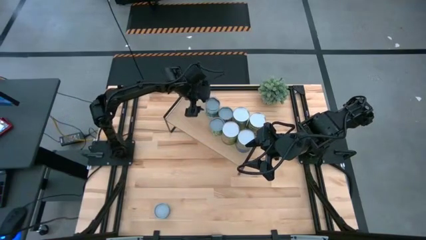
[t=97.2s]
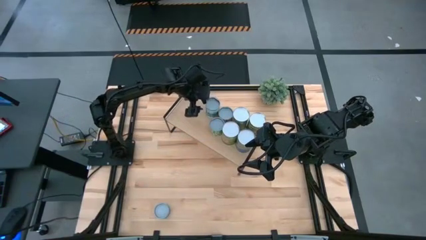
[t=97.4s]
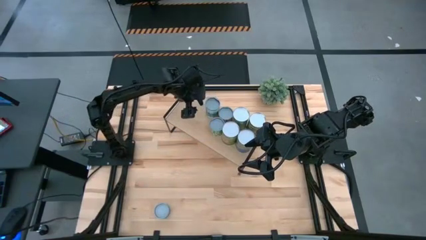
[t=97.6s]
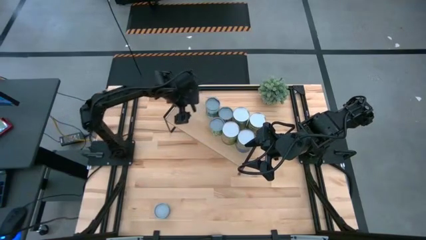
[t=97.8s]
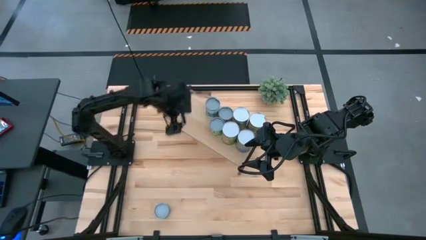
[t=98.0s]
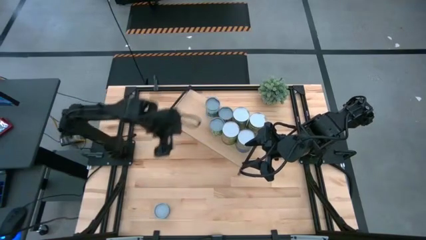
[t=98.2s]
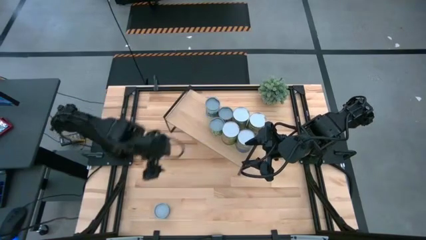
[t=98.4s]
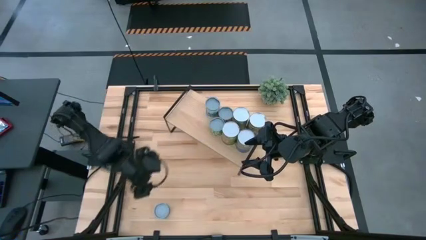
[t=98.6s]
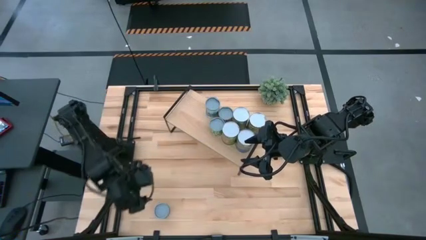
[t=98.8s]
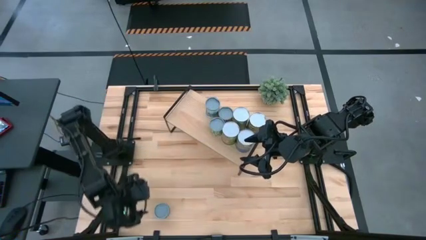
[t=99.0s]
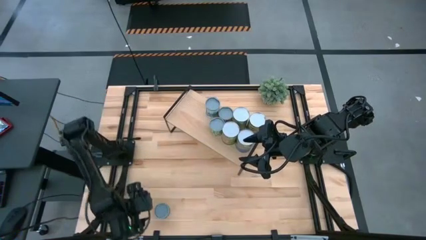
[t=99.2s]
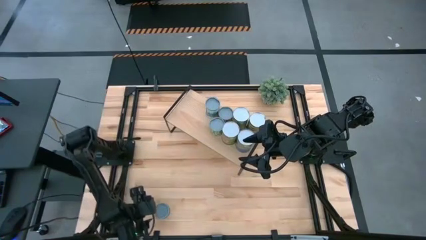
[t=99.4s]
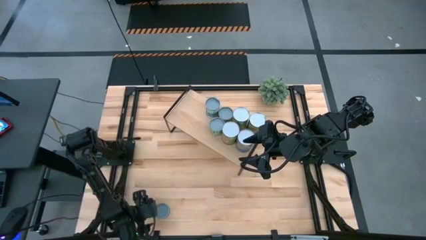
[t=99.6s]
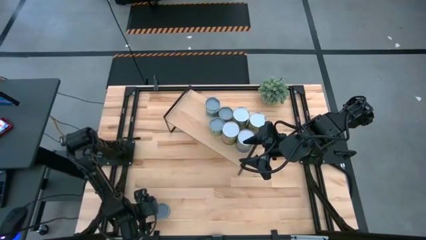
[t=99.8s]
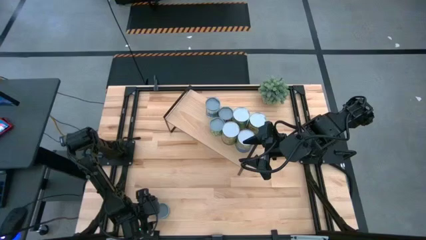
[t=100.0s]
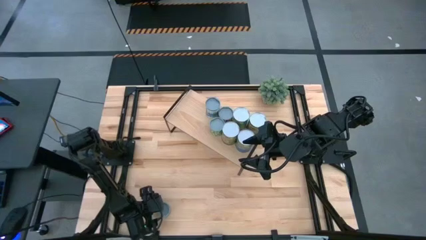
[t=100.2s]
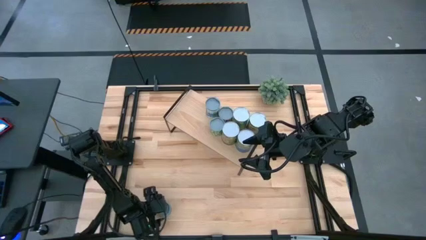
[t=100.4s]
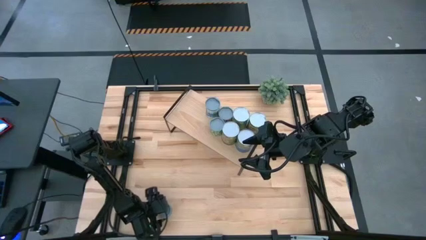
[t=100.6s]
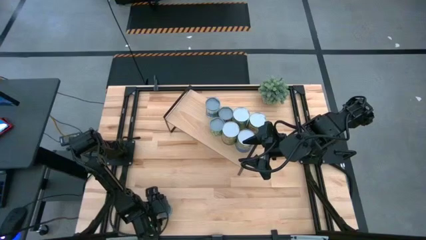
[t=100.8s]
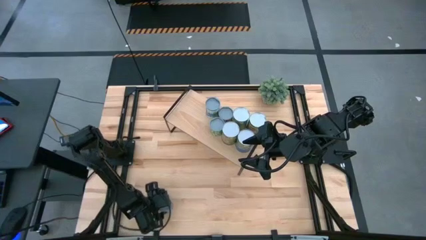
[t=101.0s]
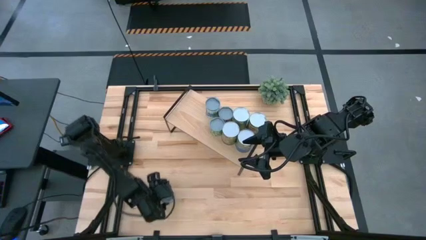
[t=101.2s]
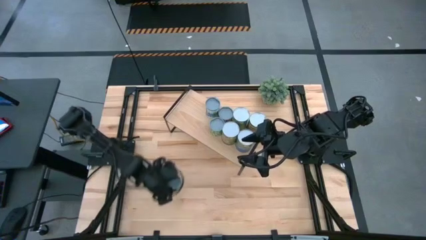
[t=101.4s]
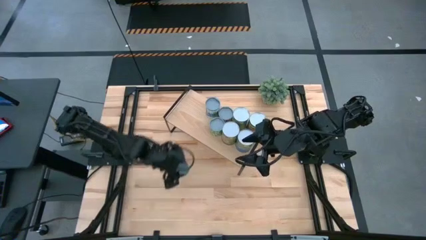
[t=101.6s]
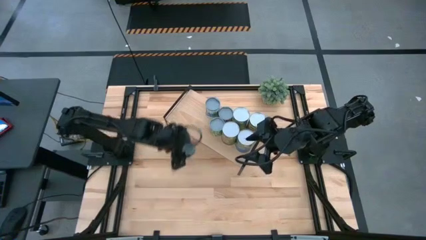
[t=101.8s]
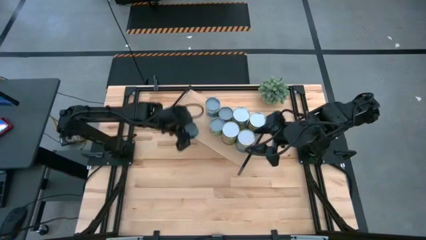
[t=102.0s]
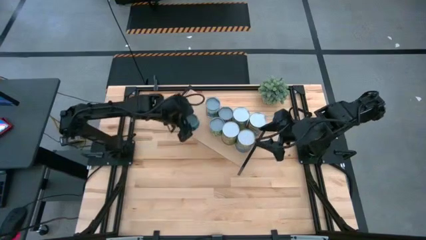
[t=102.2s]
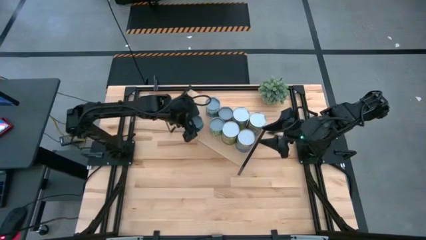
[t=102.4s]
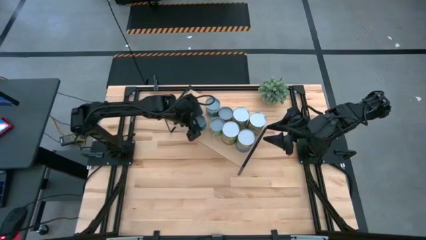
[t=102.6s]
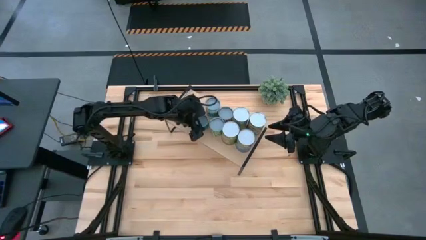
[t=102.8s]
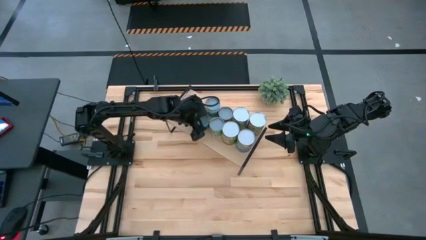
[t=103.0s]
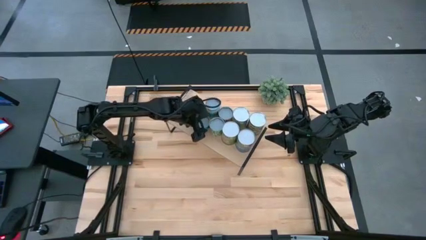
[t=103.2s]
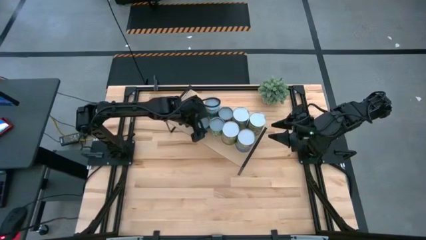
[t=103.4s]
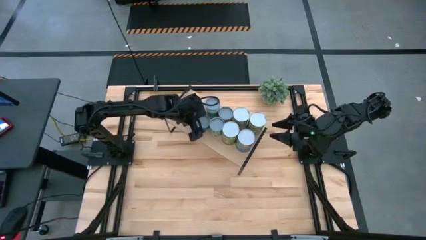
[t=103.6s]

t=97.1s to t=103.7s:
Task: Pick and place cans onto a shelf
Put the canned tuna on the shelf

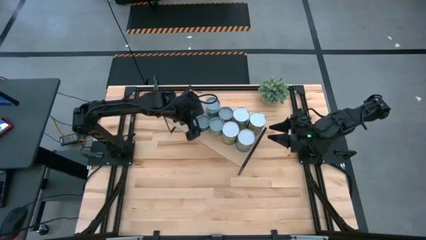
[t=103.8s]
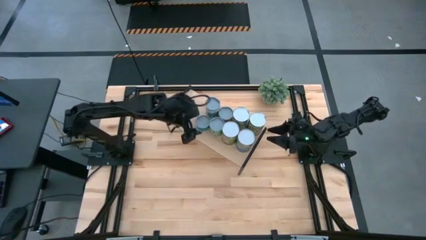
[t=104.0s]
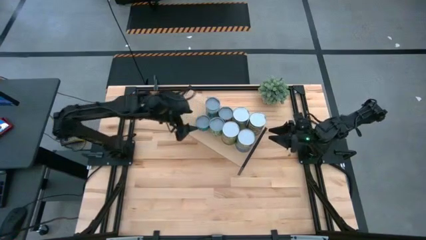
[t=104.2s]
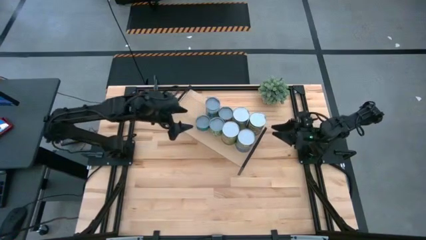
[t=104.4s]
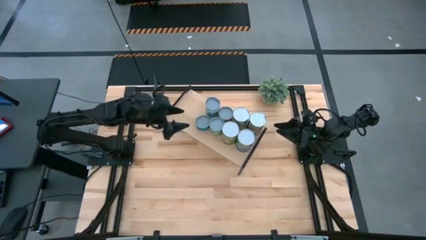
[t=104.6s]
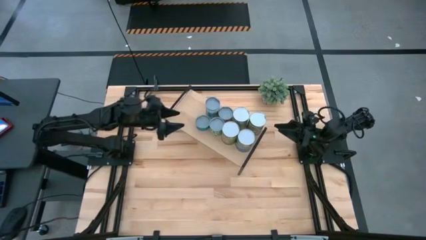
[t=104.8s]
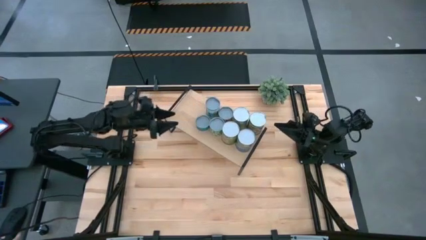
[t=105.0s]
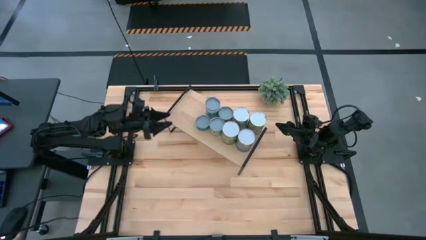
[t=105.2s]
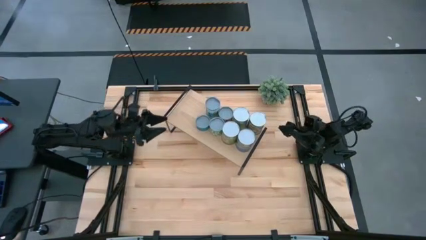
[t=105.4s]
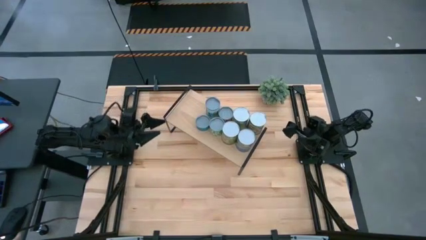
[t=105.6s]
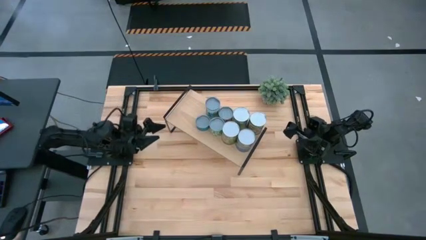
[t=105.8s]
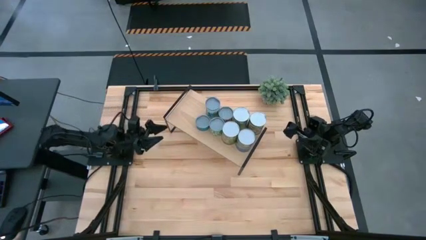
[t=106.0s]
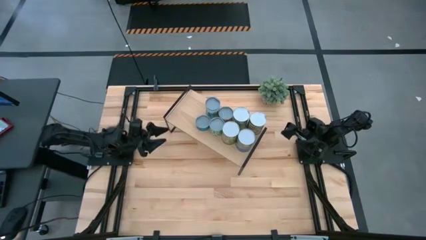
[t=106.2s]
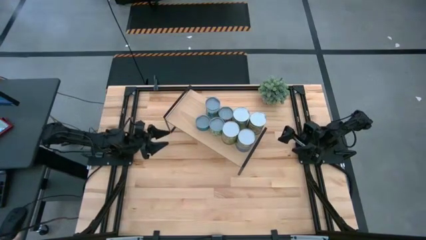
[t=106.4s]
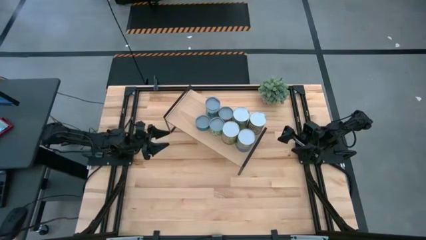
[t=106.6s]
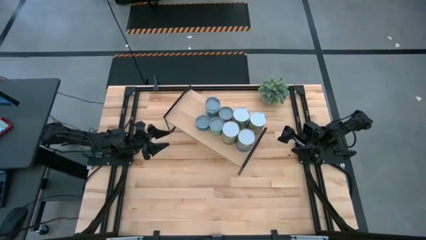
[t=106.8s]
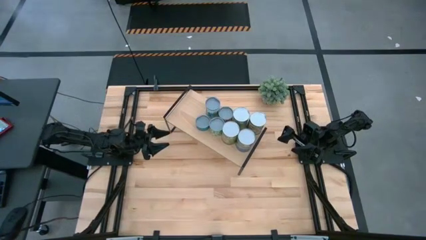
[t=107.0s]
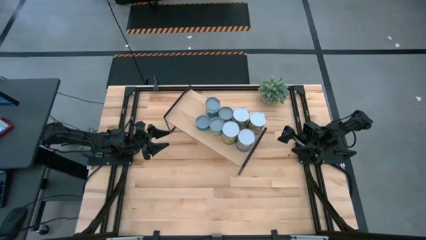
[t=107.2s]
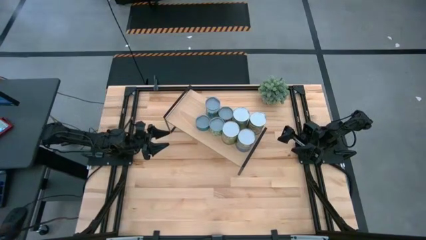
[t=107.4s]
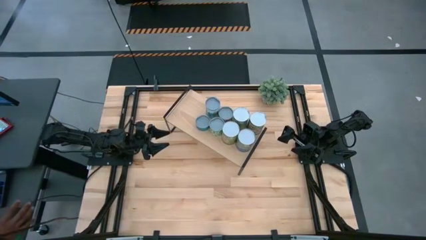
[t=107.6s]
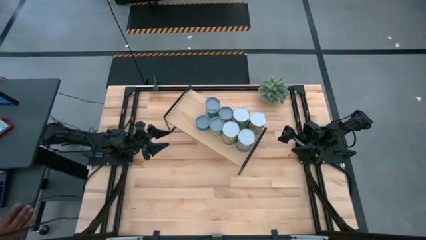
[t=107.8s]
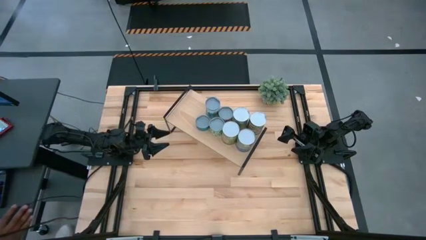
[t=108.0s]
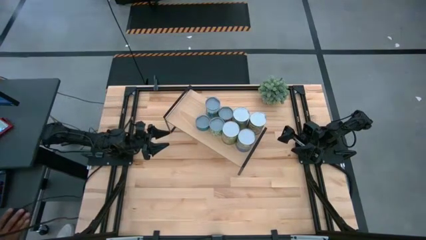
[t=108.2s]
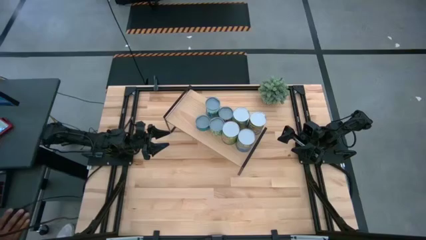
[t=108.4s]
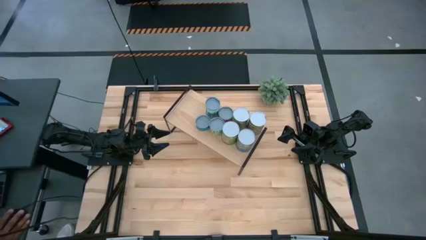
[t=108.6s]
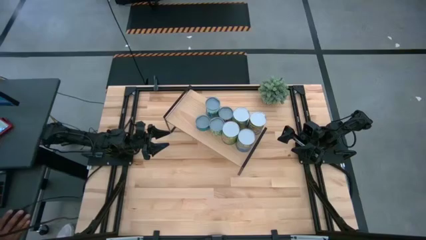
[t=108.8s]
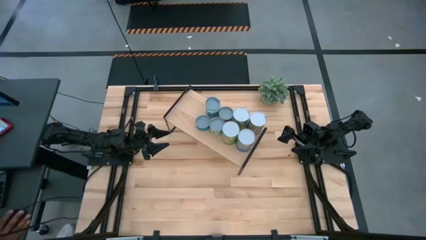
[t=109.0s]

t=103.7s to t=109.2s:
Return to Home Position

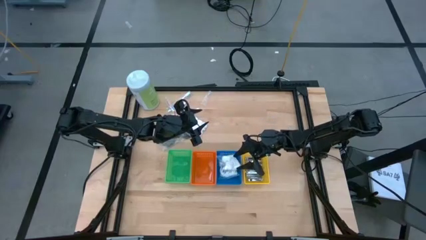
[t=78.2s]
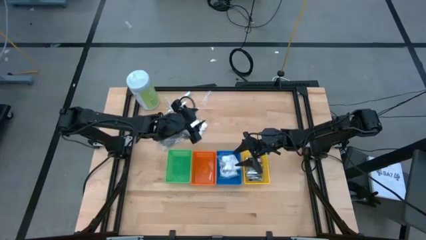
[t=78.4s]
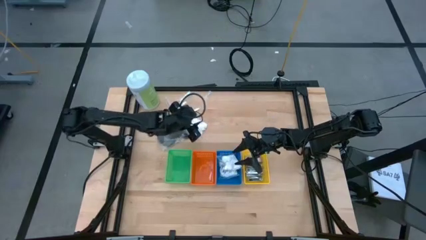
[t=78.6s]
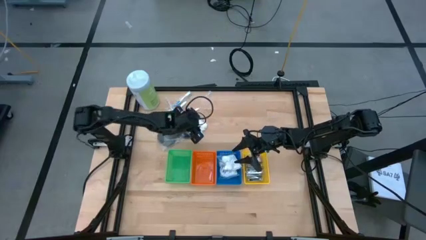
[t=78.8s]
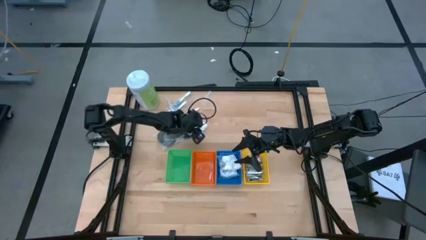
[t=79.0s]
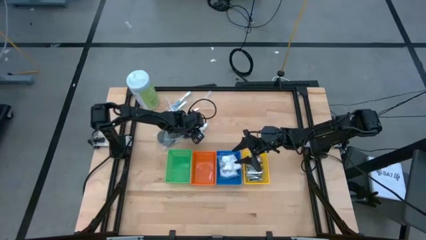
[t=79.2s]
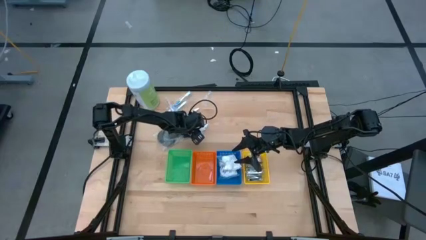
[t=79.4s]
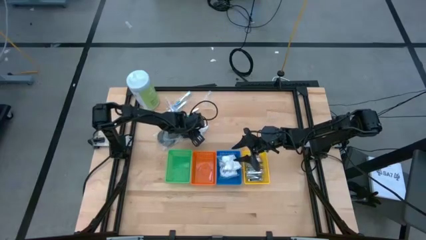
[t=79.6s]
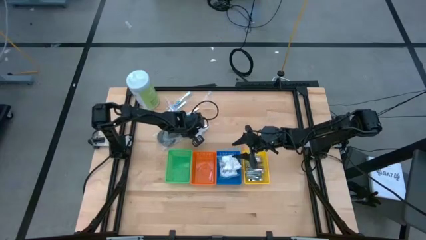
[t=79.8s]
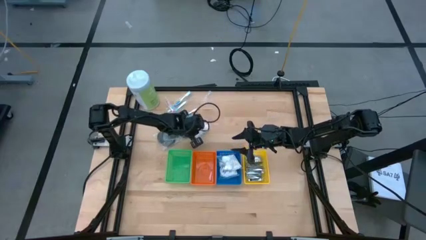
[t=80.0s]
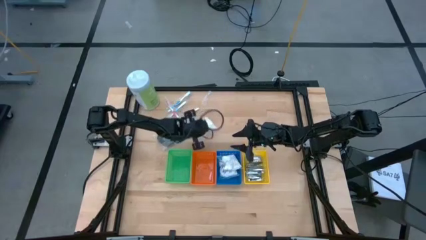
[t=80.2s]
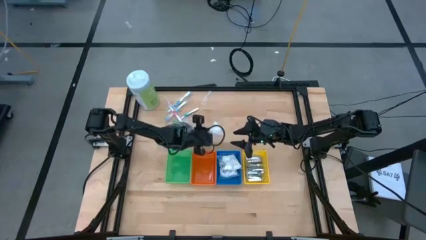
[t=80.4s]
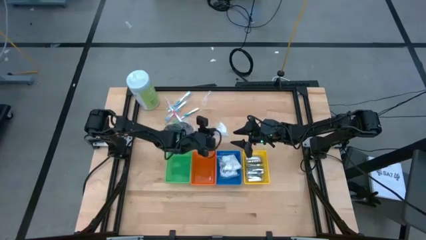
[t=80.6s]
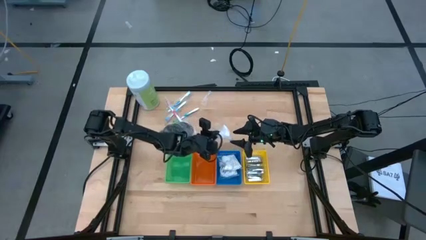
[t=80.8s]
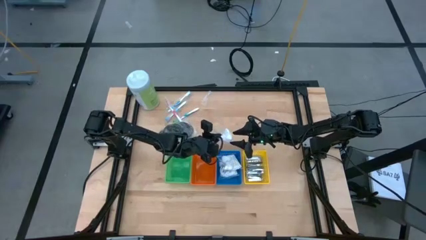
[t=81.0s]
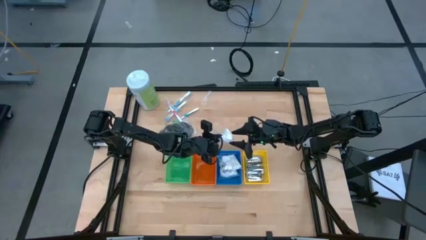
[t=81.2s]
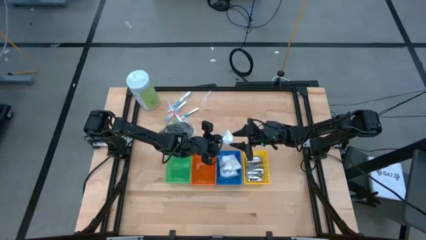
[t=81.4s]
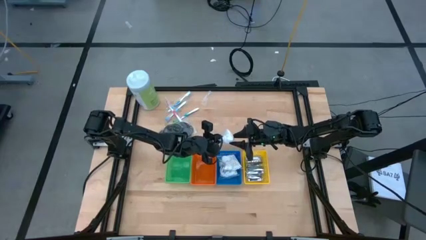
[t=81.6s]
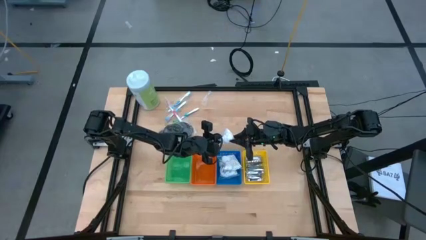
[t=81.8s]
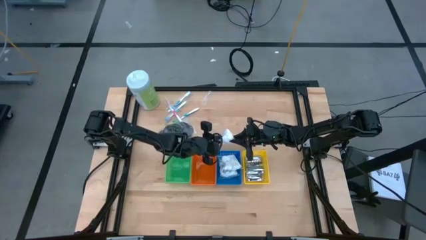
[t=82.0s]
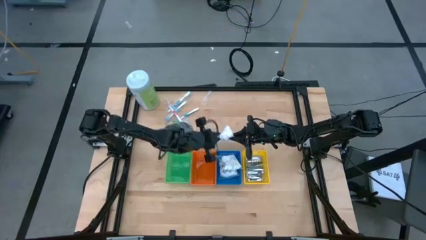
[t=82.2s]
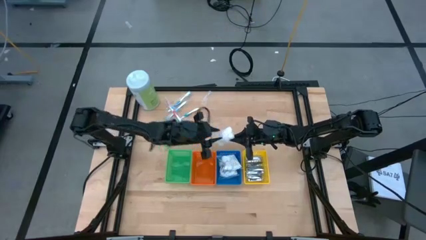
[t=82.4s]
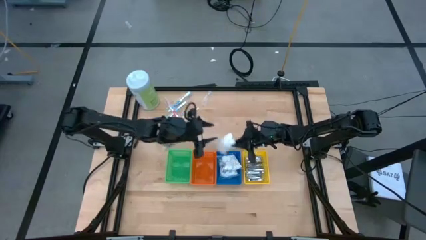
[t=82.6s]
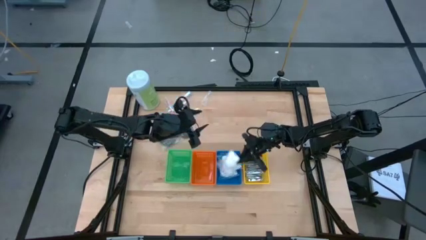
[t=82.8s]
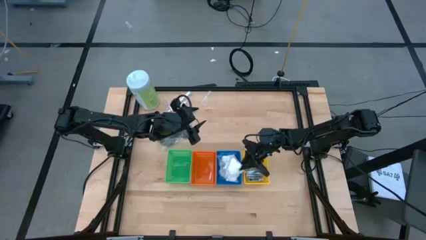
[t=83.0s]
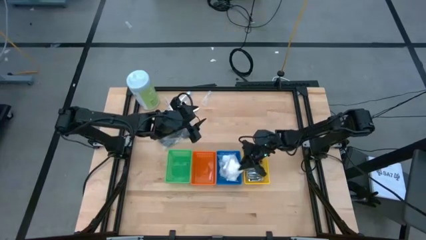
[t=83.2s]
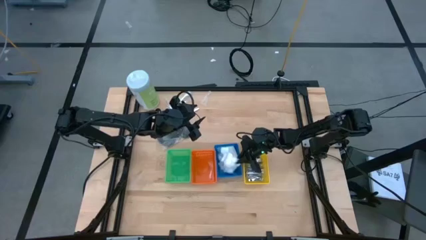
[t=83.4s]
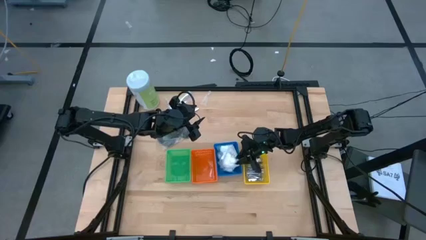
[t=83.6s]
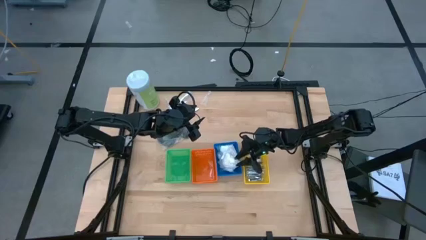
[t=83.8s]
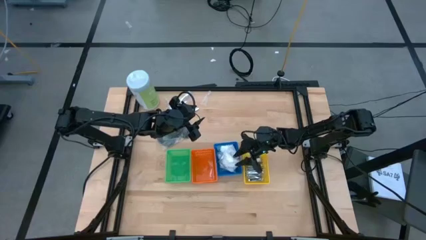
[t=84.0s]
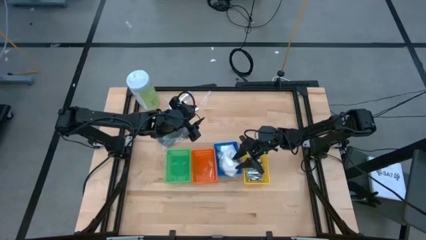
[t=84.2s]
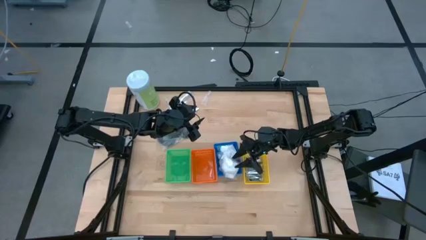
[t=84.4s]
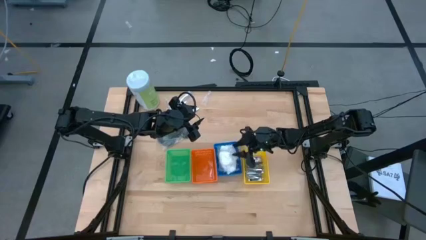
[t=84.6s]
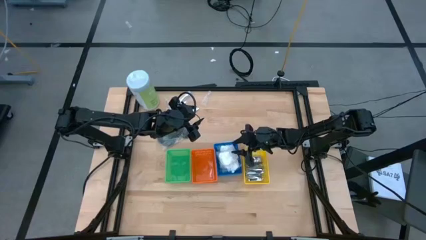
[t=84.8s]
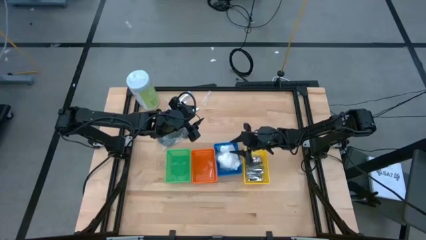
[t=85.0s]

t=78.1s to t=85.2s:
Task: Pick & Place Travel size toiletries
Put the cotton pack into the blue basket
